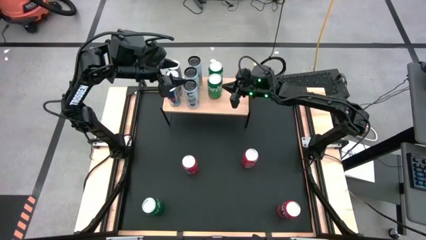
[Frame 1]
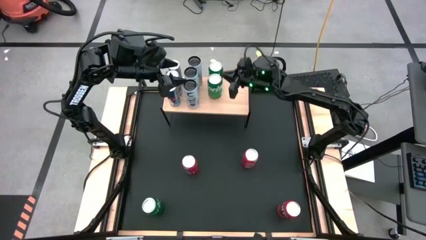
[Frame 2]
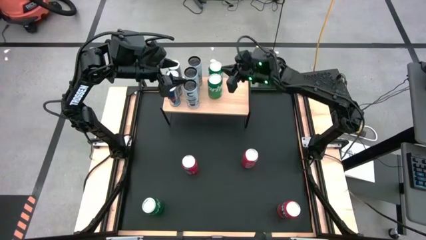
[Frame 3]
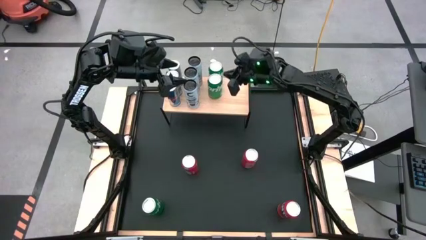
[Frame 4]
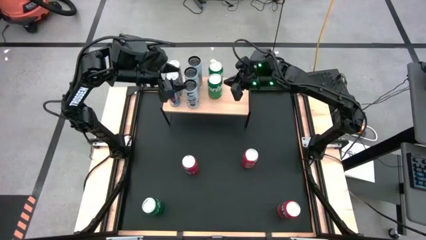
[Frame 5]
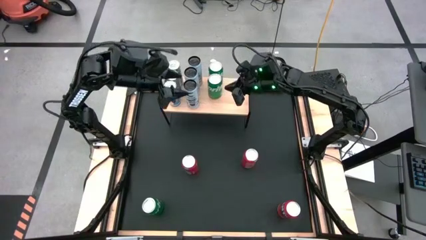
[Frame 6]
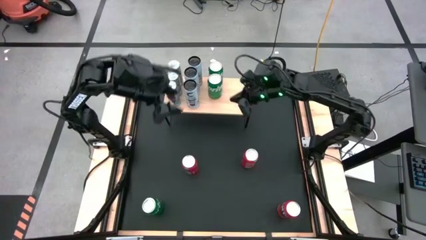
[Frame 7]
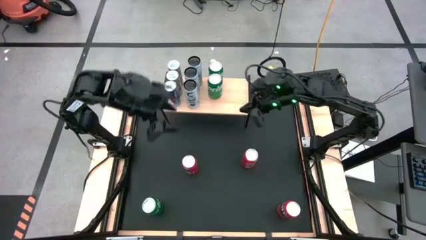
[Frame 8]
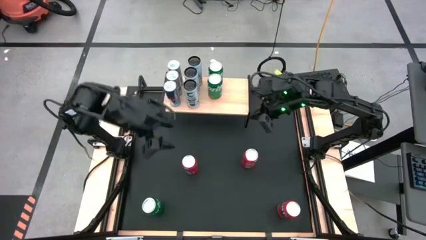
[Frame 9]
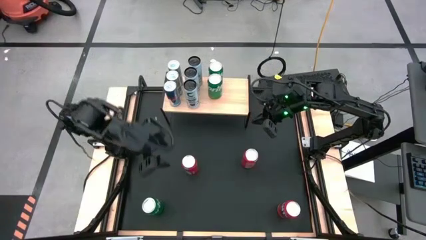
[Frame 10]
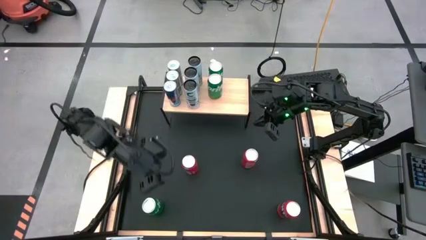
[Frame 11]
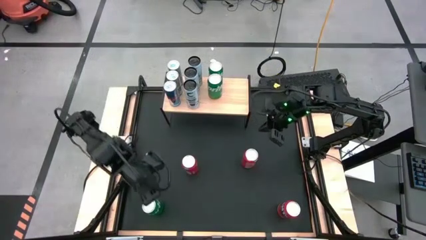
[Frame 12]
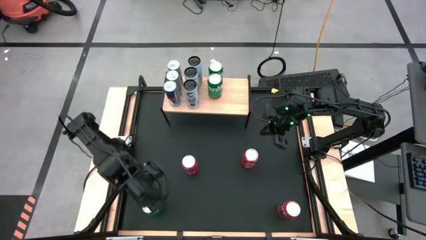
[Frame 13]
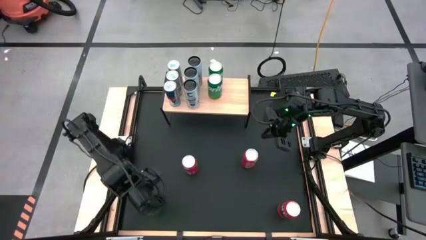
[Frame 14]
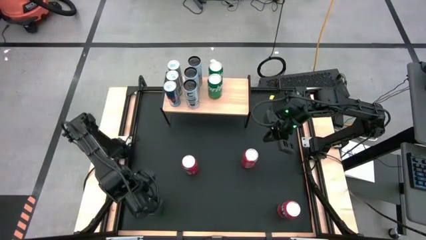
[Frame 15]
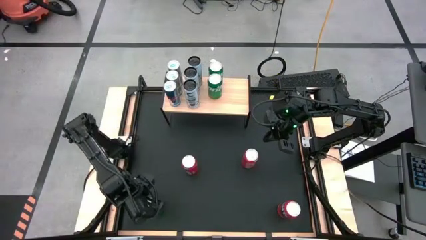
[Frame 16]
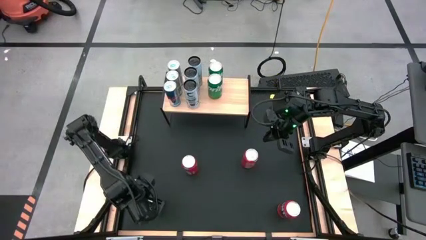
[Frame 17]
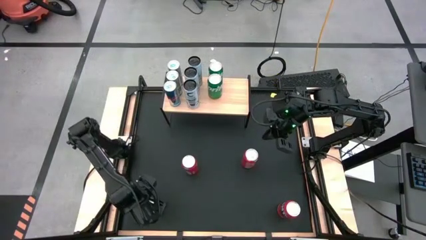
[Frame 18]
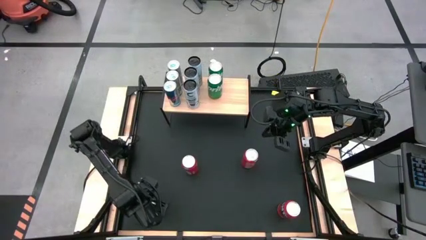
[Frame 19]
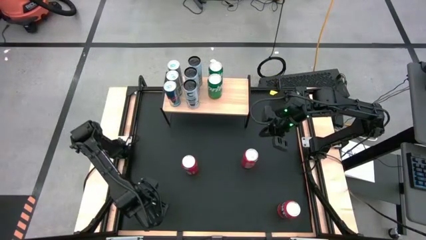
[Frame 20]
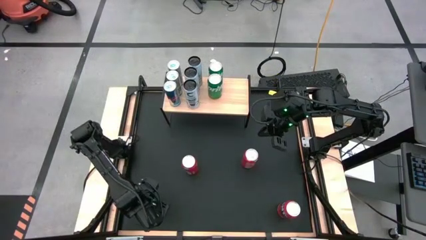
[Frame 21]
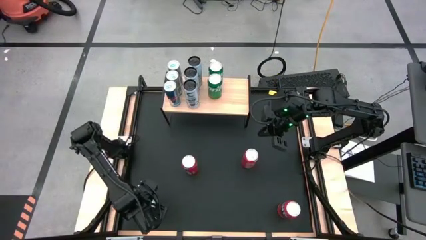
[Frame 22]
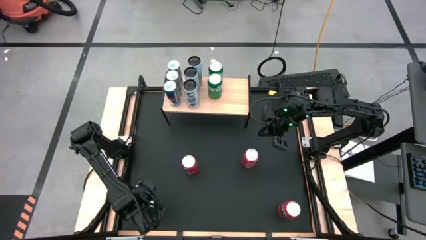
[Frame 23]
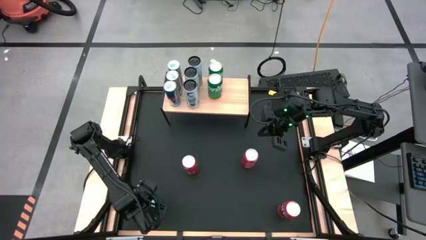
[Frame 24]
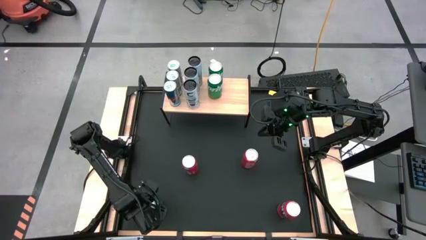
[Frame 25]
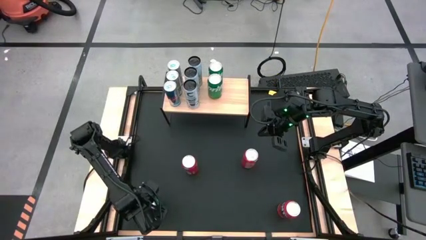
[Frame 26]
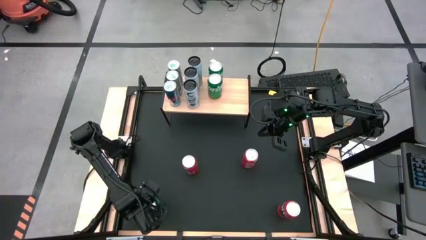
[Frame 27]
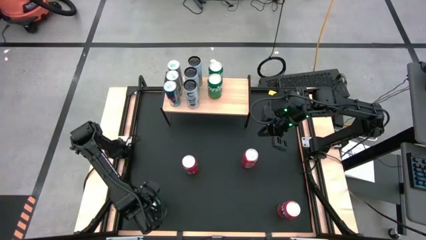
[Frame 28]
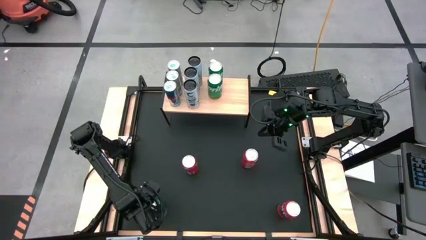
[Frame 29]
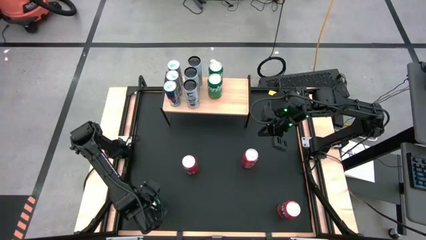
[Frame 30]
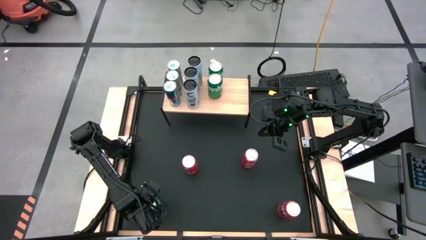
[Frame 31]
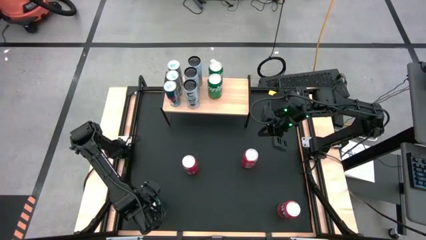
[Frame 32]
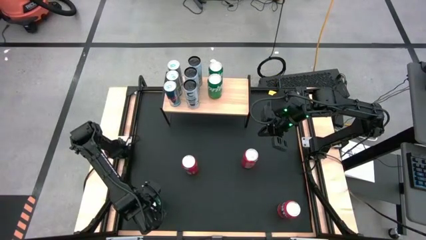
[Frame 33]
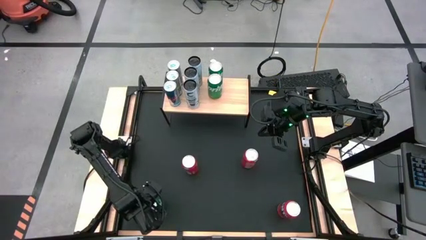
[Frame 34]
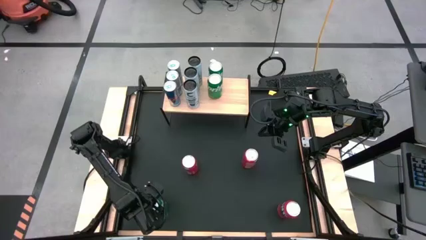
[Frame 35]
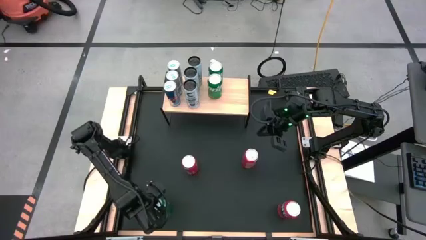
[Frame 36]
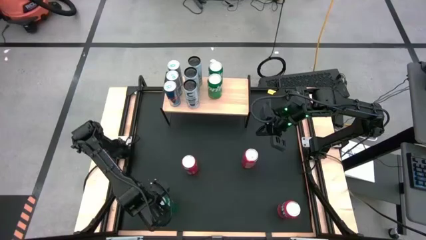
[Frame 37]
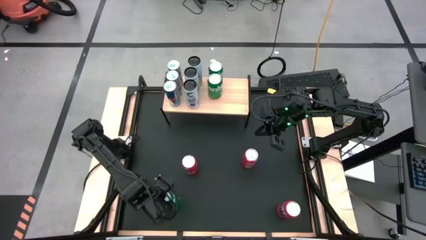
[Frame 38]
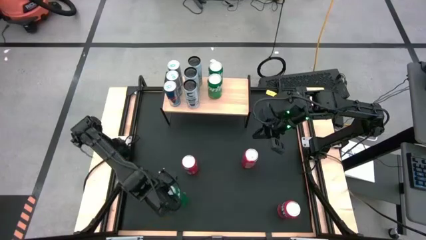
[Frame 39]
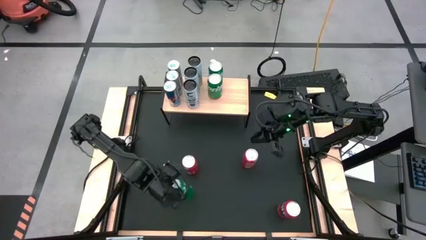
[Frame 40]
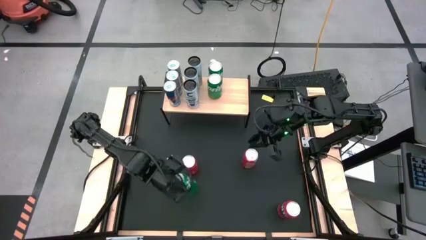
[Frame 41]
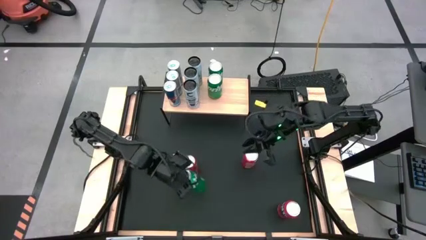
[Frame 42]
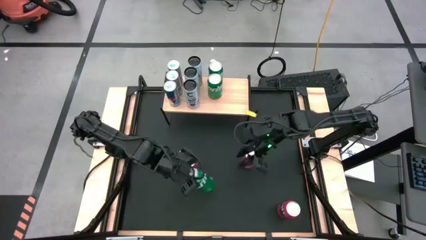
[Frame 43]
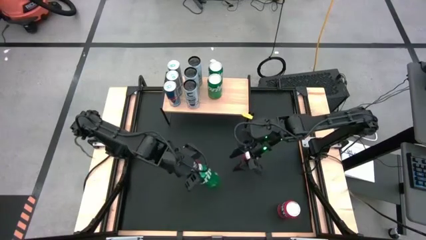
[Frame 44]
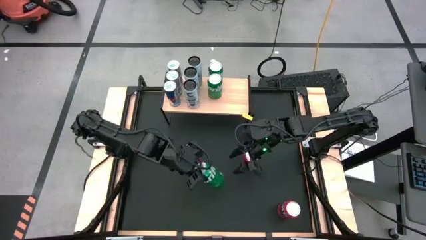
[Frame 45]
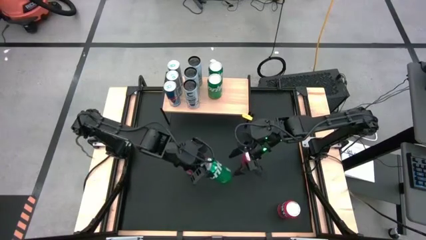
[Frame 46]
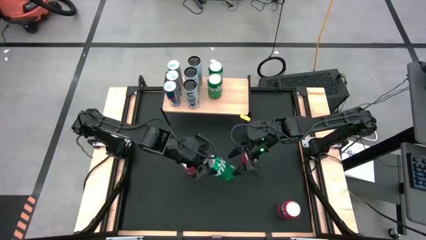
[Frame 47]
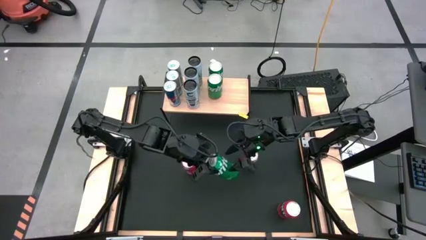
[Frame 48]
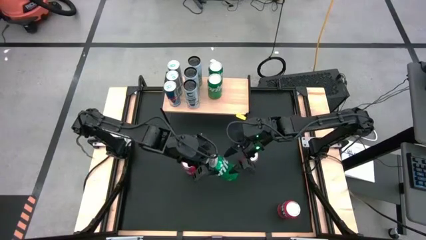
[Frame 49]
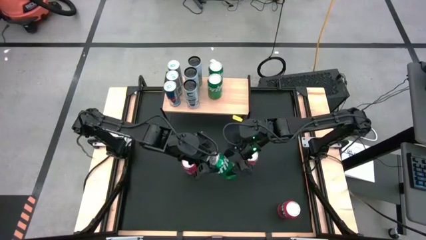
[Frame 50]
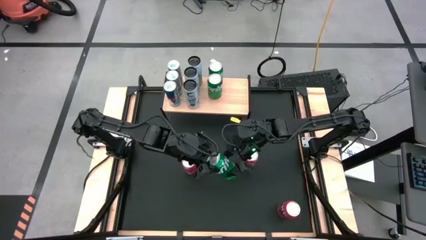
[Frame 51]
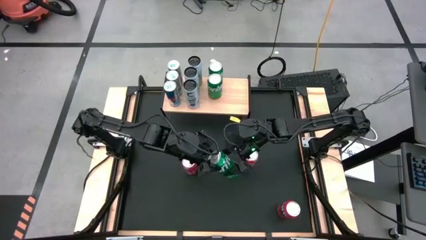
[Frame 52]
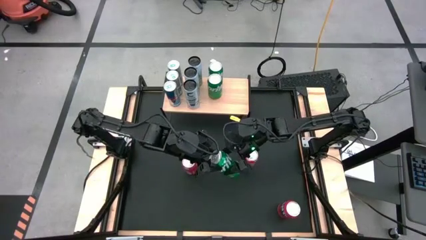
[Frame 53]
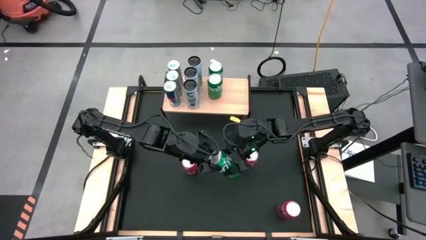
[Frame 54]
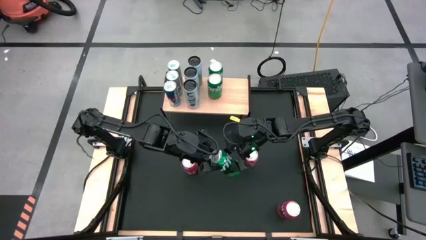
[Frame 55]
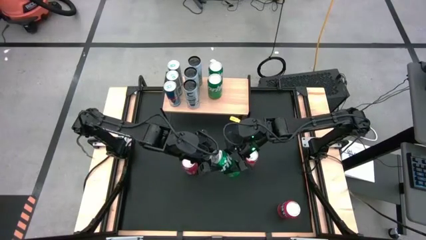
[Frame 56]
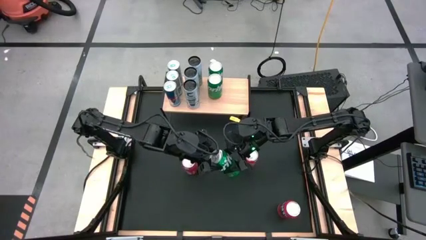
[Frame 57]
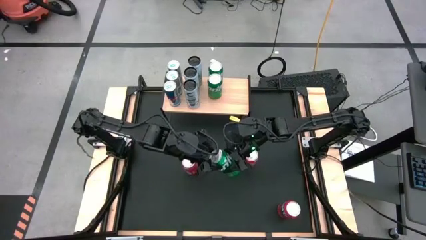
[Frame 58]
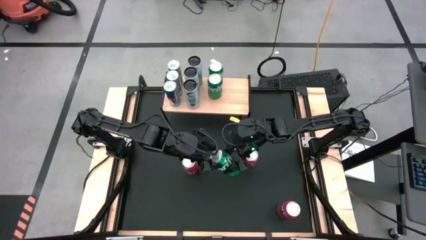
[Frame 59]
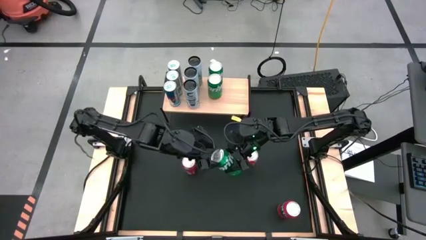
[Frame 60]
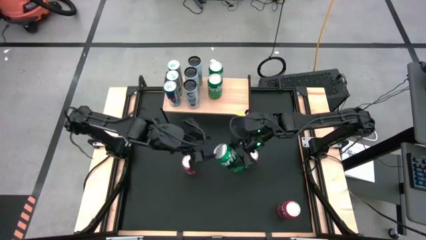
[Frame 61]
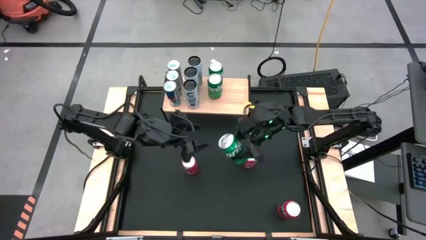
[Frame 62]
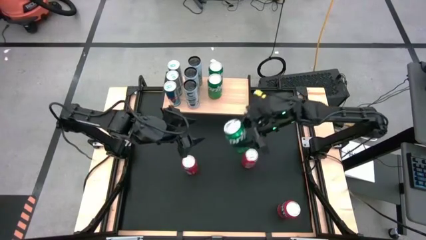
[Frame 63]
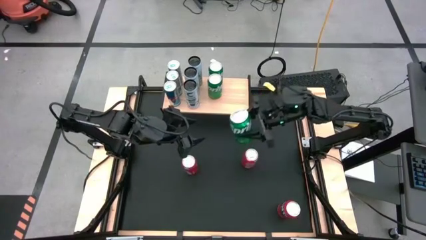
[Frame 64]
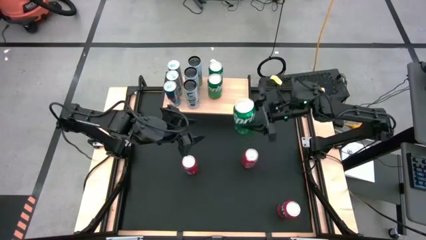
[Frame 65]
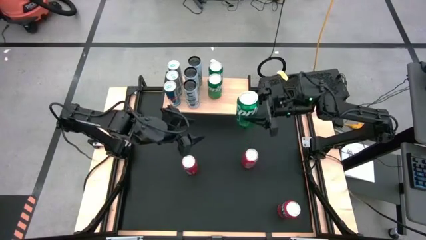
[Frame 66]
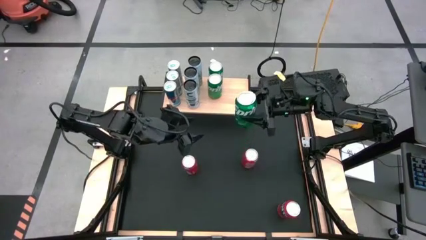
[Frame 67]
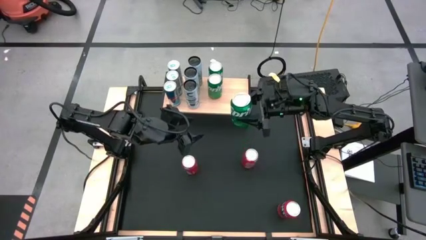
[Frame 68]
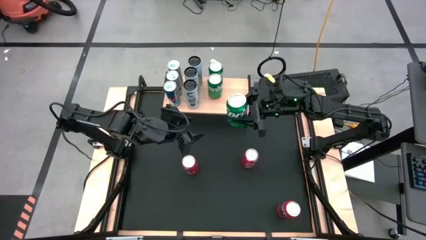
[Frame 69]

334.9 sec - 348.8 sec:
Task: Place canned beverage on shelf
Put the green soda can on the shelf

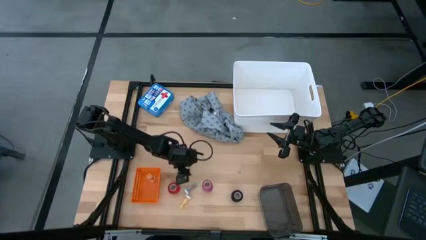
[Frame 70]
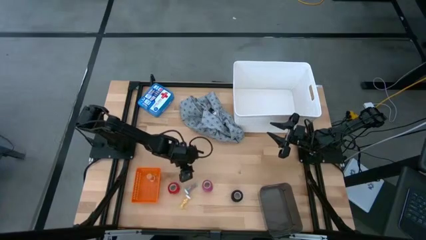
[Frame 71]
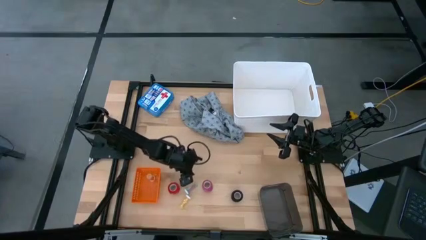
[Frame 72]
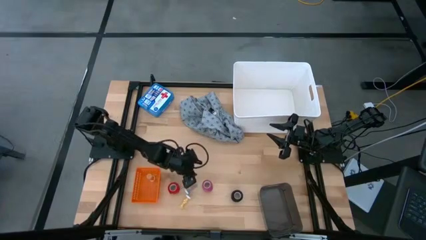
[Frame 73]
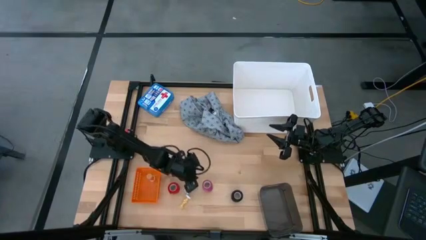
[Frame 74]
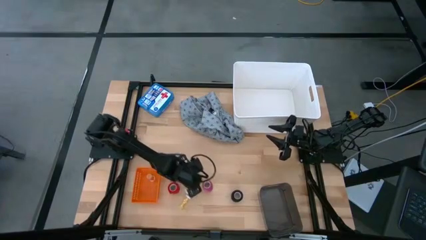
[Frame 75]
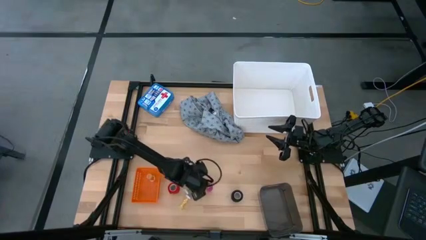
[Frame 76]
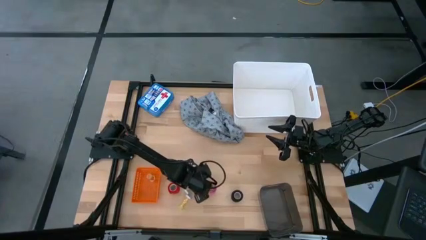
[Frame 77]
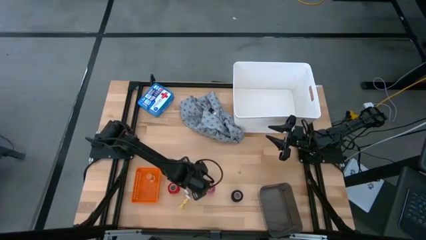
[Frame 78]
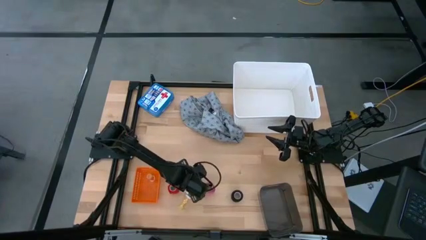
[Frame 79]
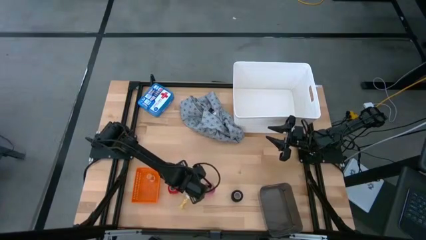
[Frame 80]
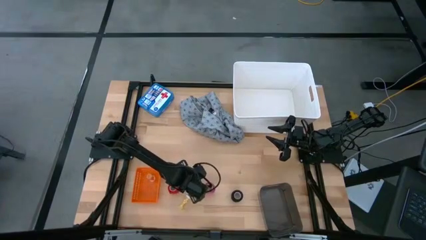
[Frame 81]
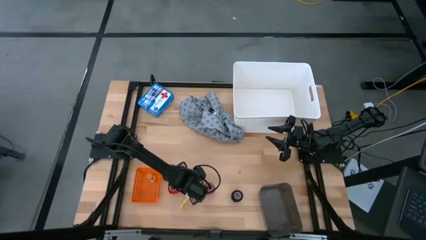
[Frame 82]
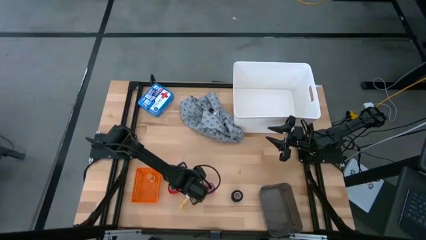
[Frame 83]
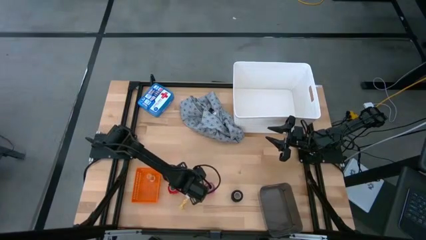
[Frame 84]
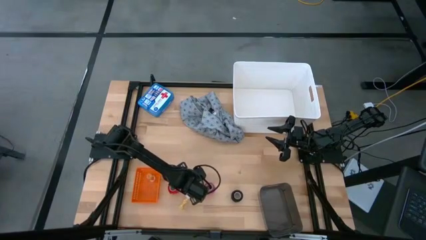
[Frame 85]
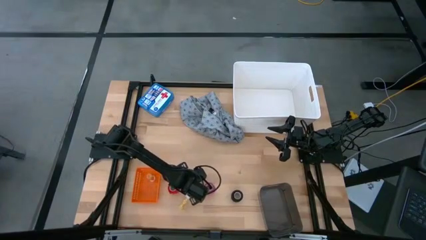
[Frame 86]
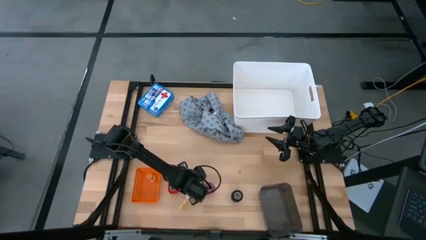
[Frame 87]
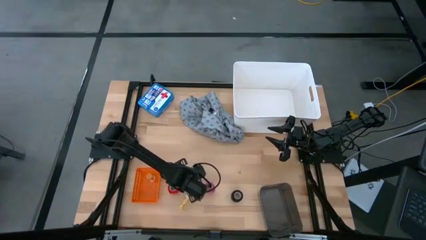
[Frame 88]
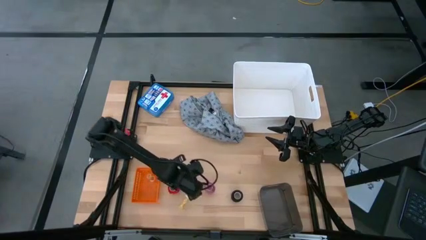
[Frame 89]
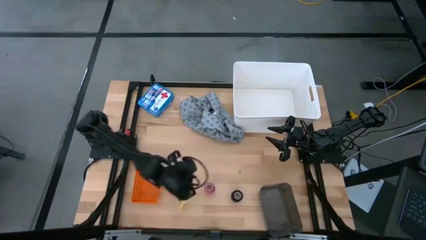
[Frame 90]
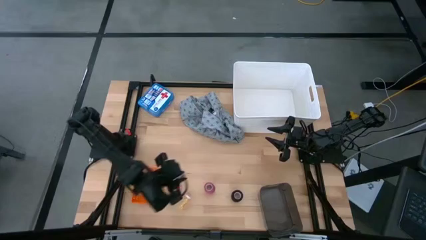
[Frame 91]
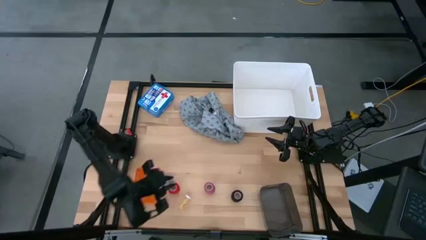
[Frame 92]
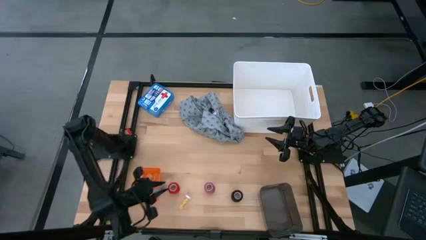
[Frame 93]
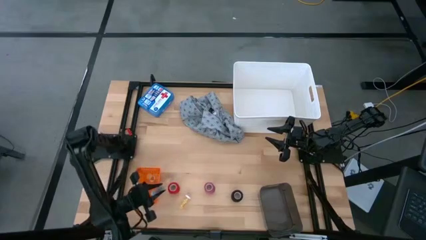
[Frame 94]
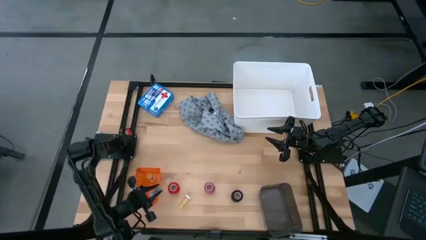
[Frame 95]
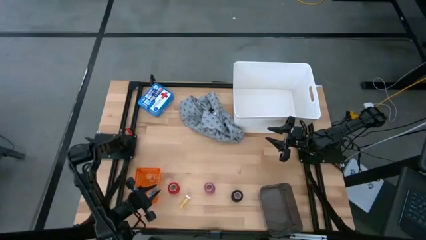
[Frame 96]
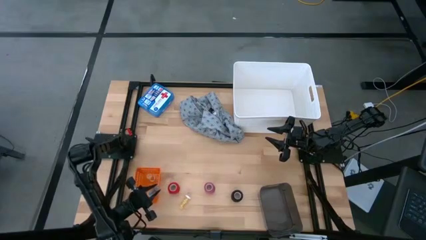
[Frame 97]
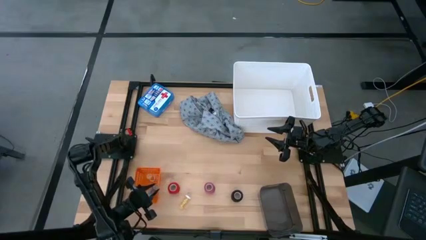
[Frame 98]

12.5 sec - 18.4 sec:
Task: Pick & place medical supplies in basket/bin
Put the blue pill bottle into the orange bin
